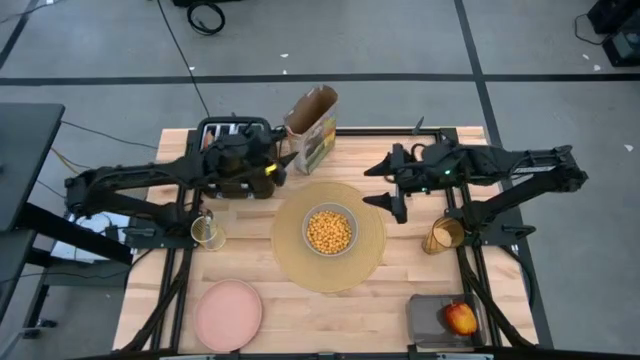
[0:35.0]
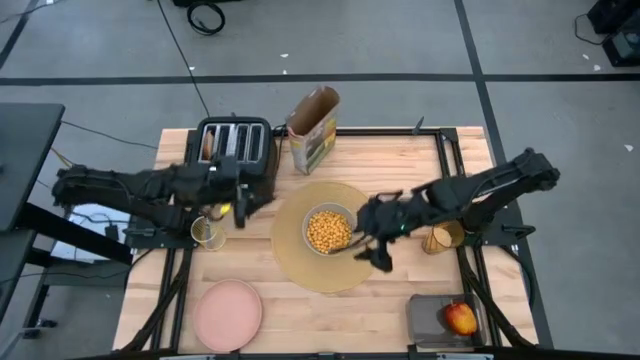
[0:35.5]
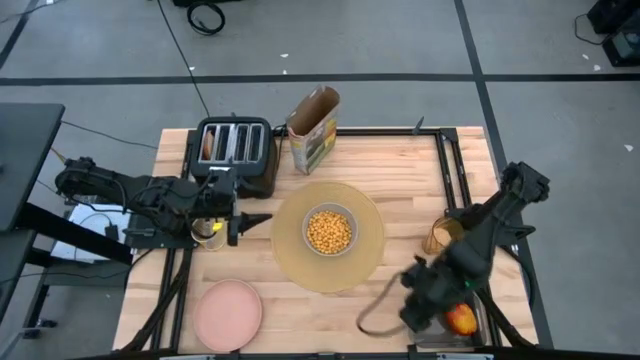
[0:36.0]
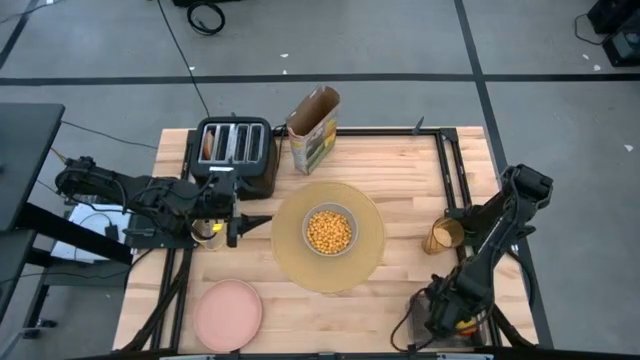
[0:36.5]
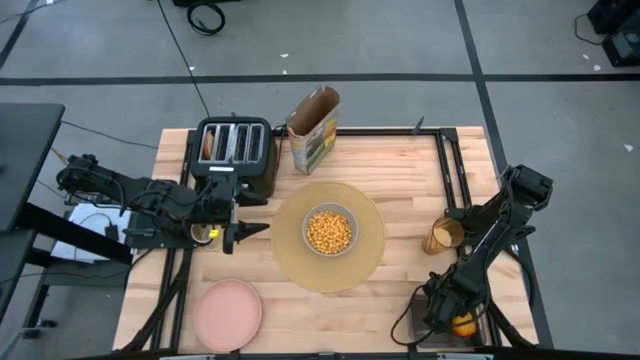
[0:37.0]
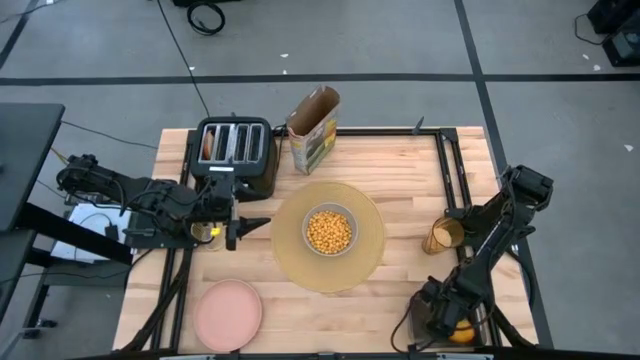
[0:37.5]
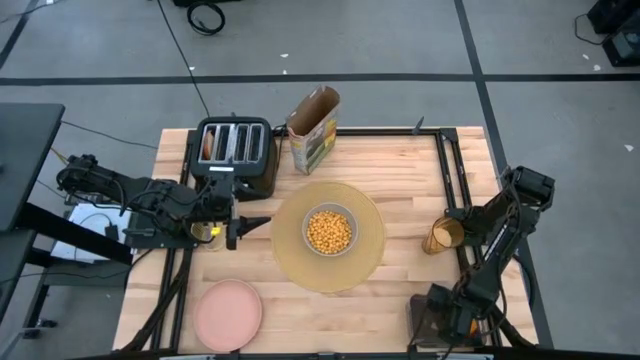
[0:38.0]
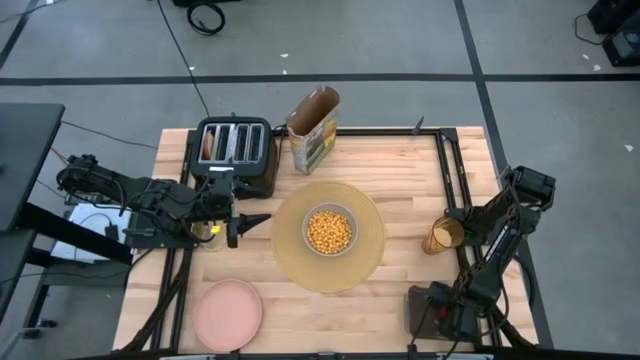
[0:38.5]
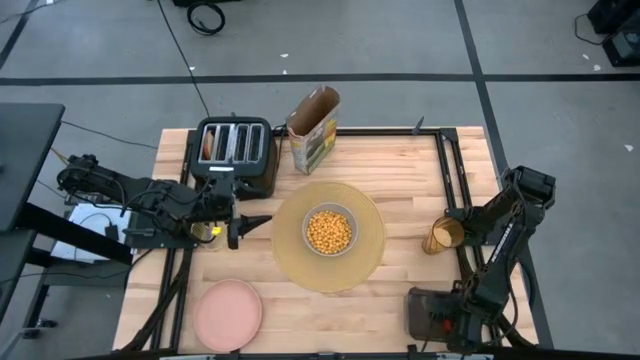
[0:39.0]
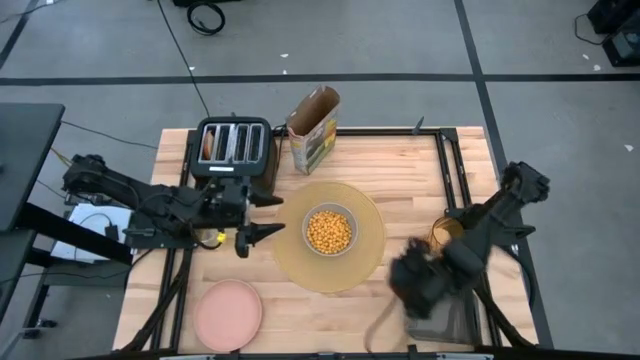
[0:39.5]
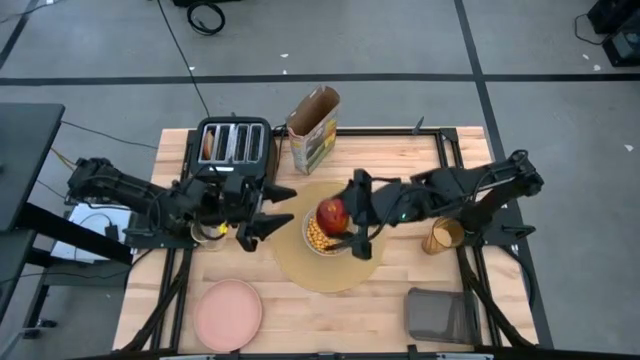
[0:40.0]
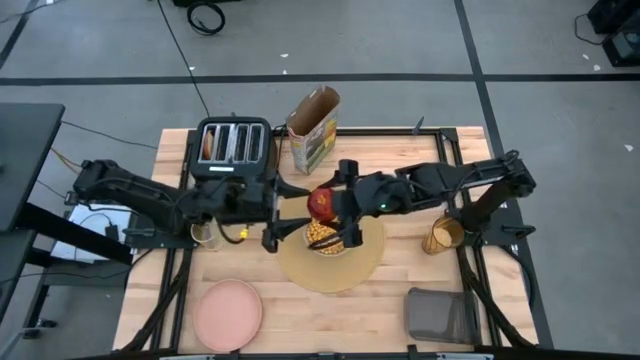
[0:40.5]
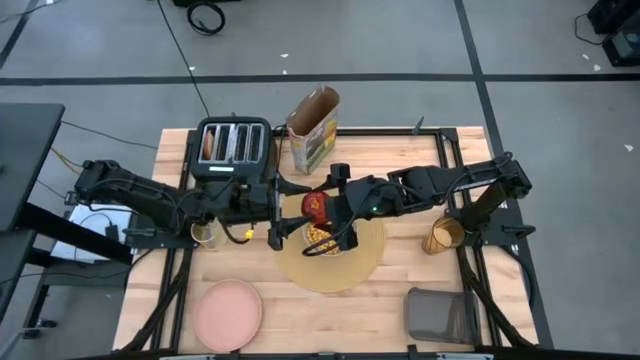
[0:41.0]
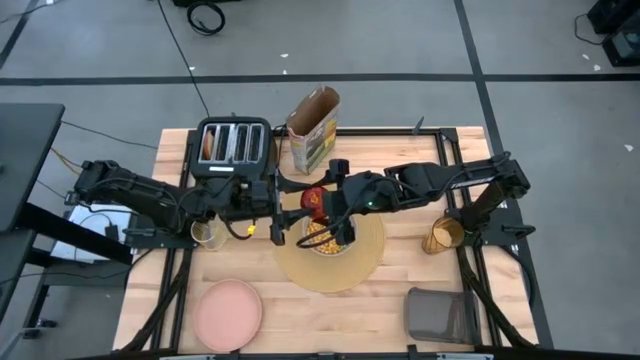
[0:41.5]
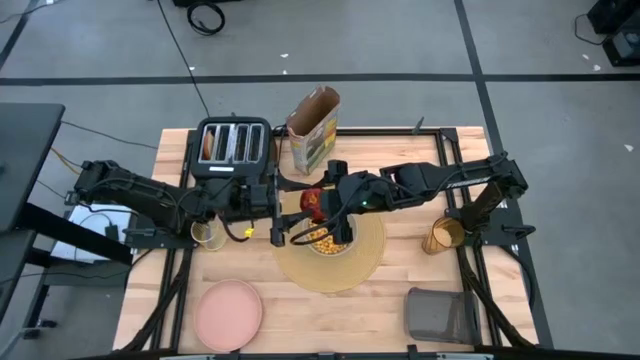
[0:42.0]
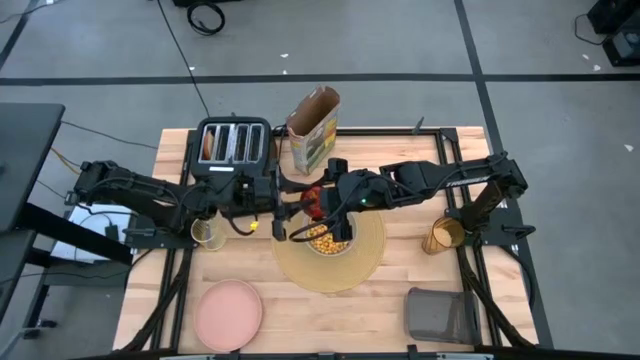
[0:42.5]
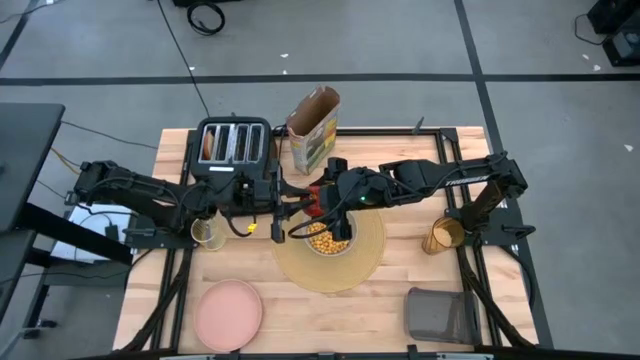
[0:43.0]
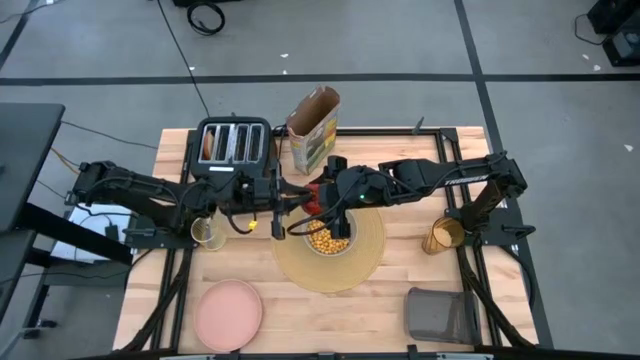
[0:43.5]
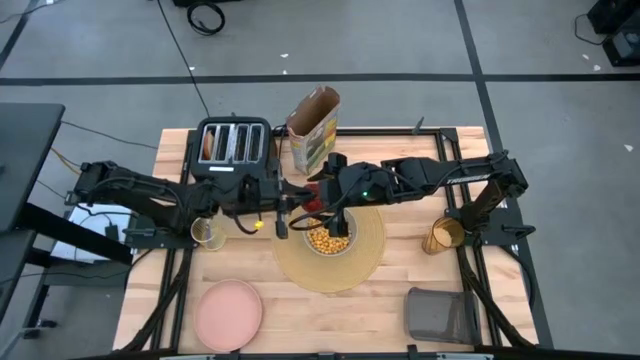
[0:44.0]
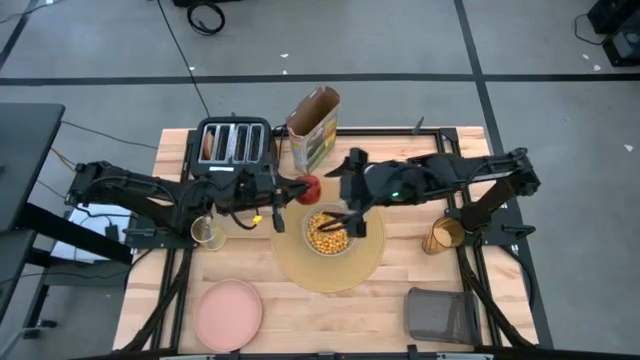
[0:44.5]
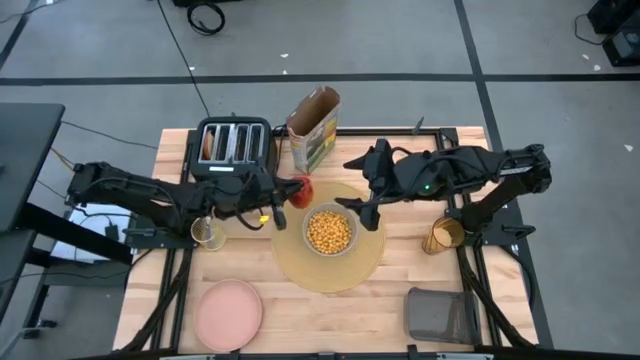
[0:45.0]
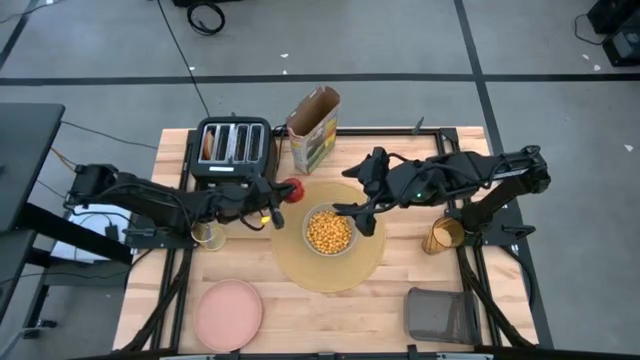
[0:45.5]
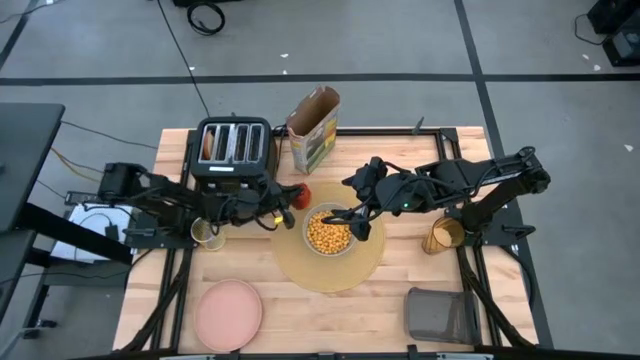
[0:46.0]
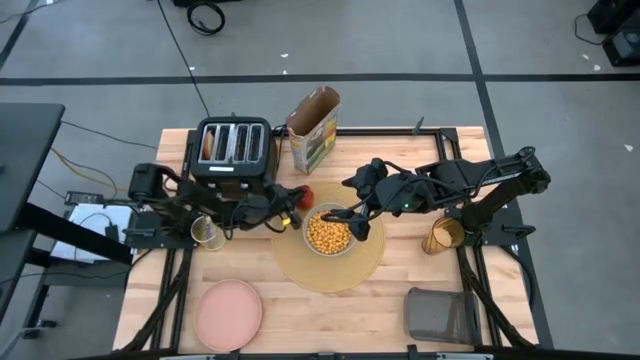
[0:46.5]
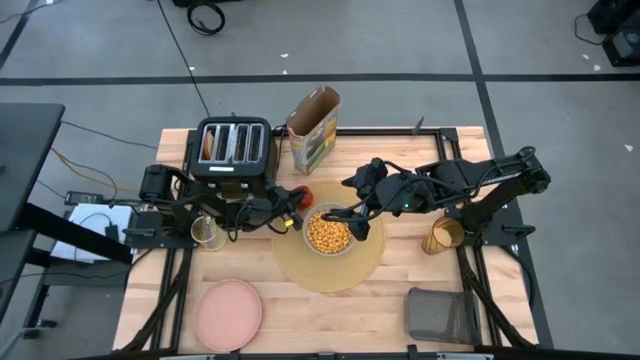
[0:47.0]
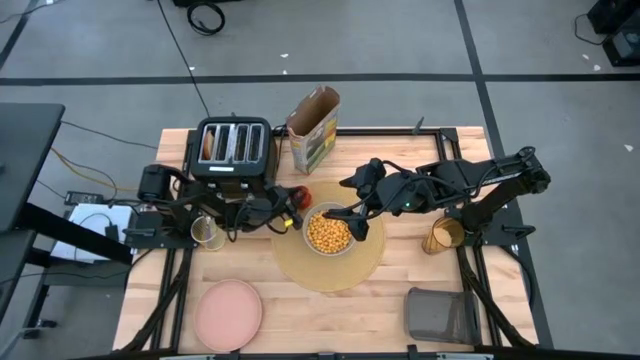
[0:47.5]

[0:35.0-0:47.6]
Task: Arrange a breakfast setting
Put the apple on the placemat to the top left of the gray bowl

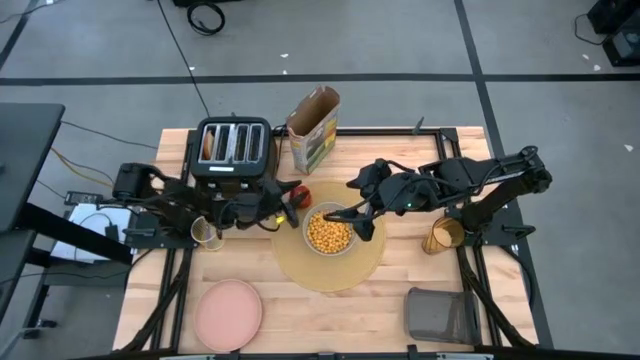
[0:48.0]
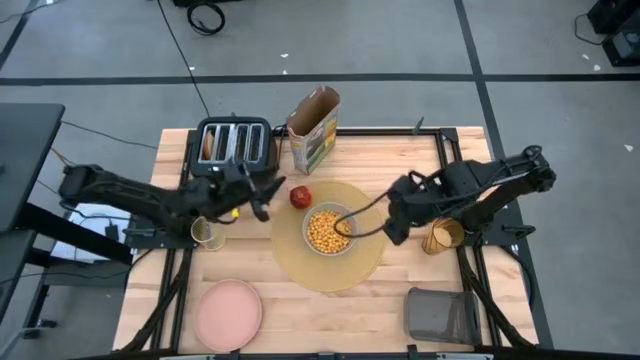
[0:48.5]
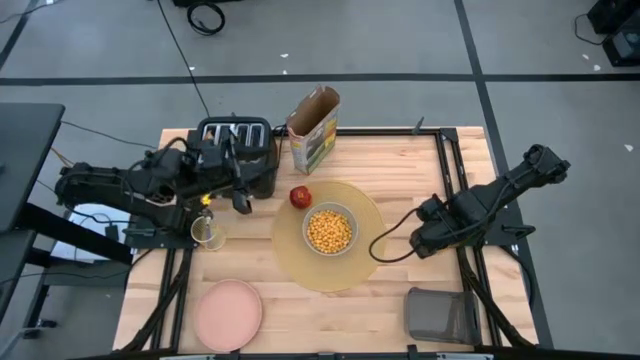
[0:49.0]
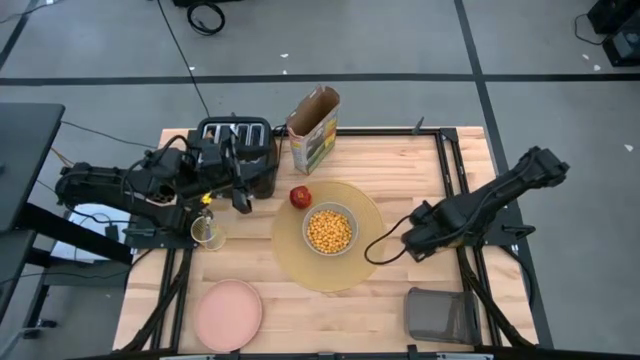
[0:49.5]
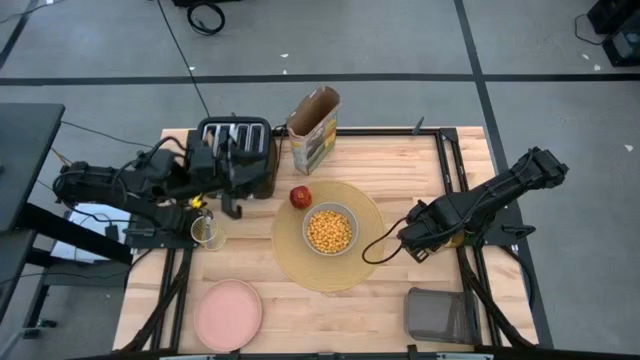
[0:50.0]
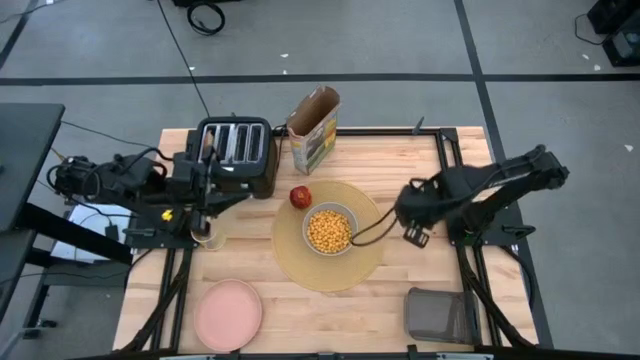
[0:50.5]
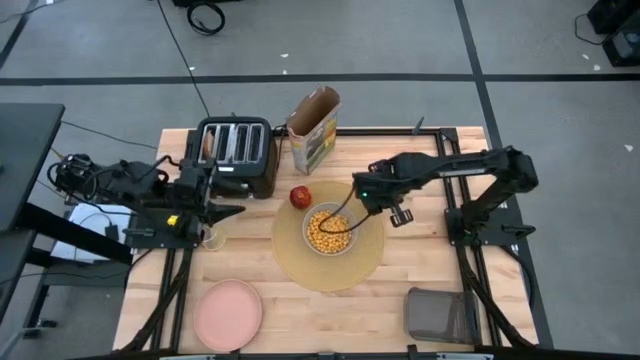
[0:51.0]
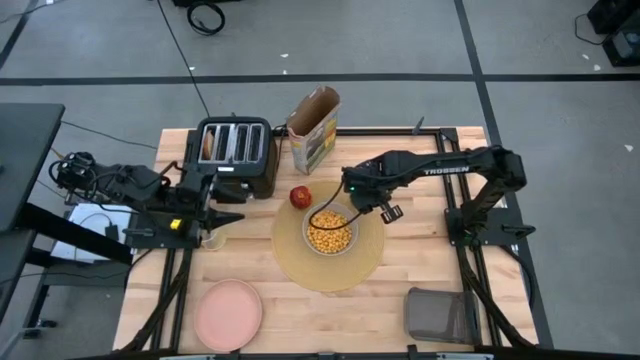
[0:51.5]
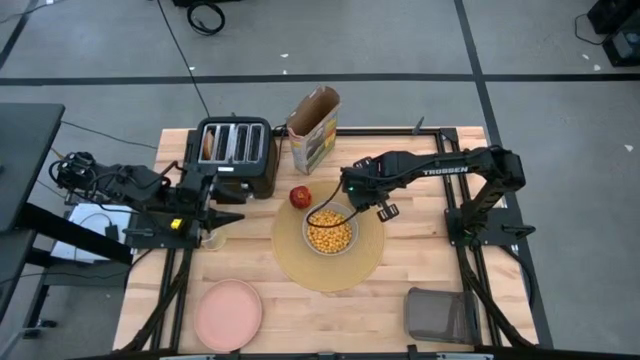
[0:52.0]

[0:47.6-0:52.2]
Put the glass of milk on the placemat to the top right of the bowl

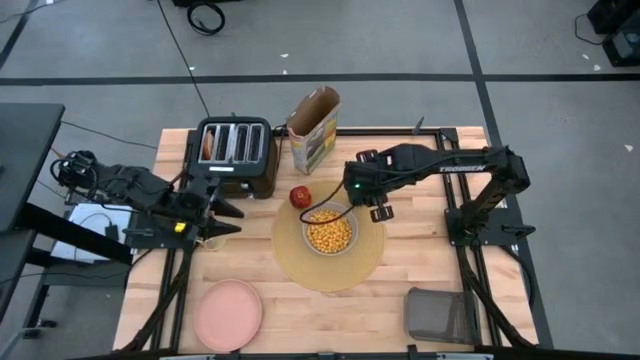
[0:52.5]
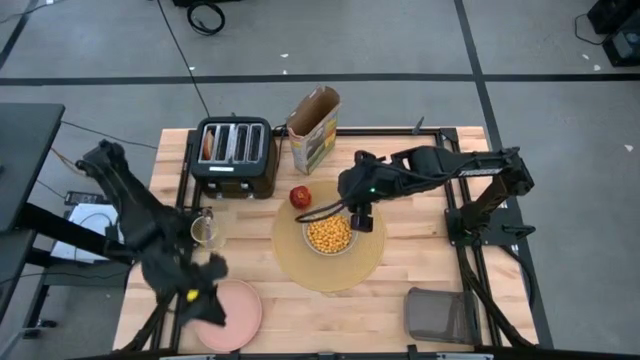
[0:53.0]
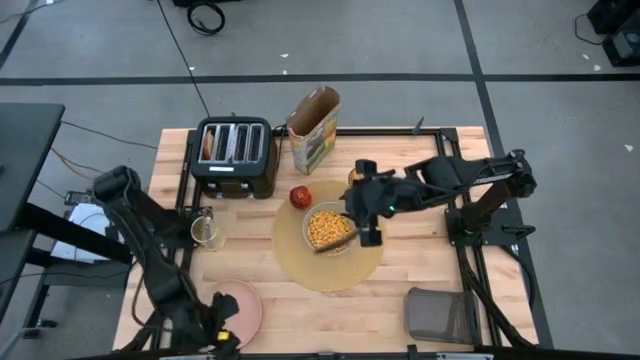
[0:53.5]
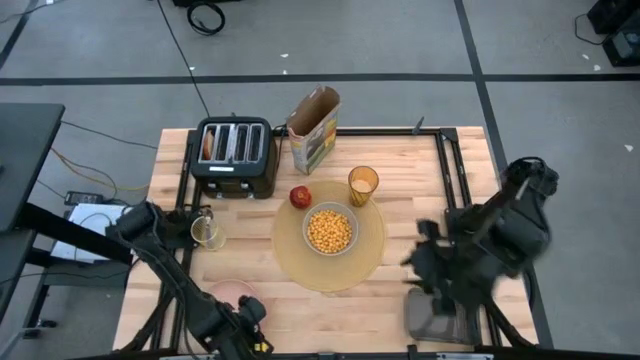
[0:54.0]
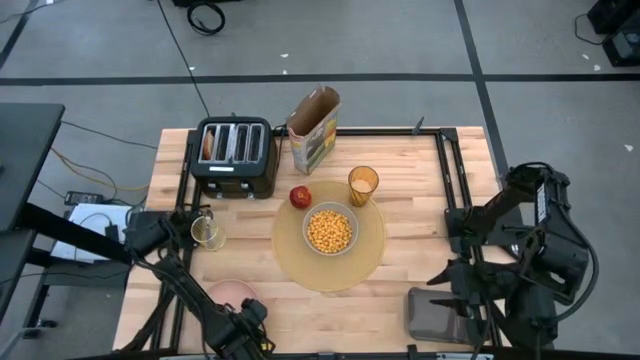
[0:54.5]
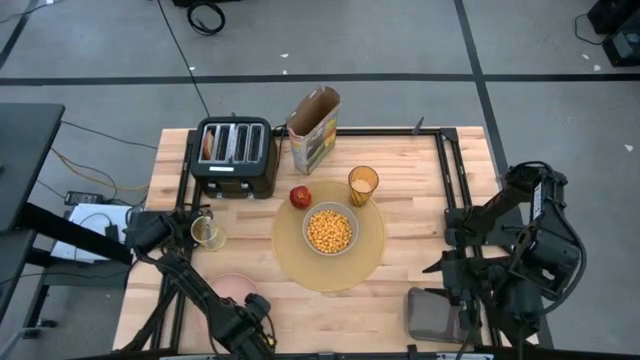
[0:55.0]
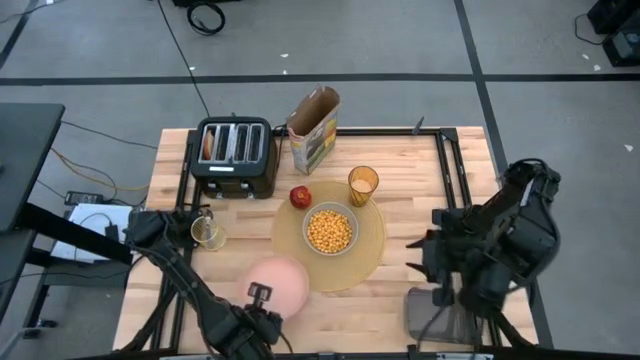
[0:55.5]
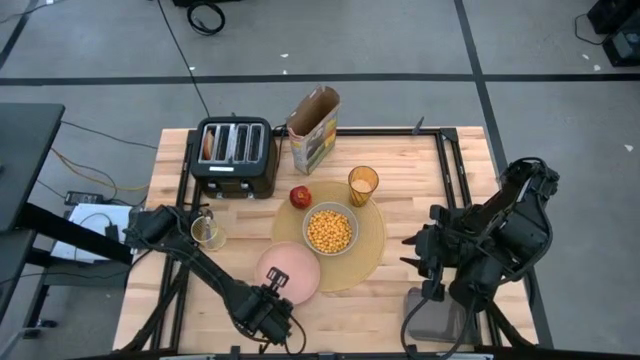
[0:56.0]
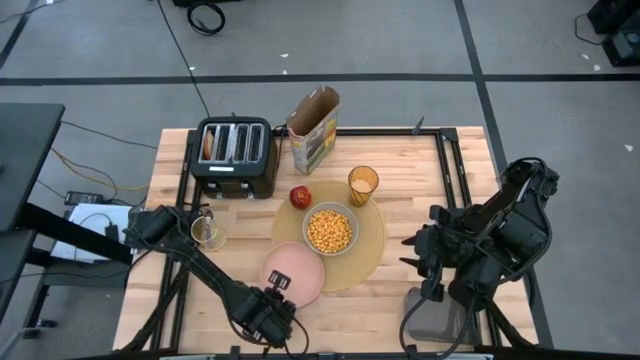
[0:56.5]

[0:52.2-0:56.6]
Put the pink plate on the placemat below the gray bowl
